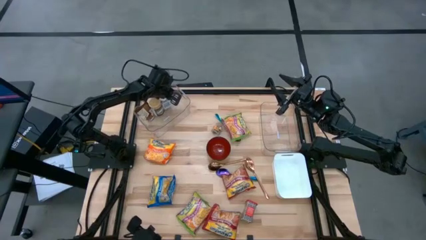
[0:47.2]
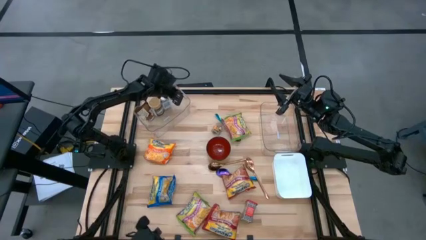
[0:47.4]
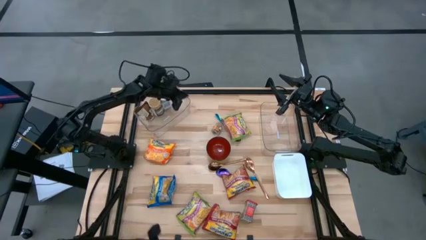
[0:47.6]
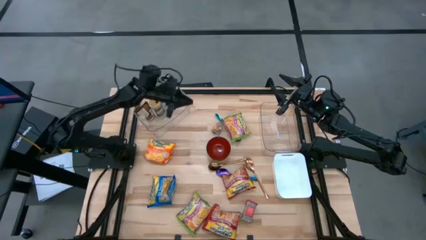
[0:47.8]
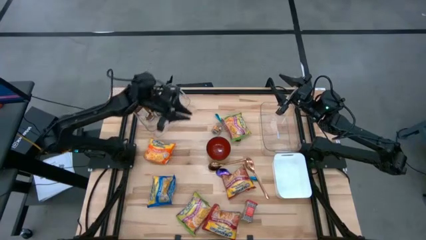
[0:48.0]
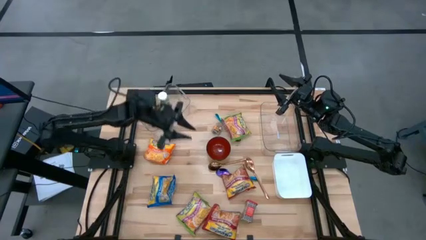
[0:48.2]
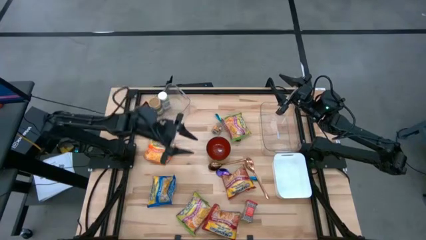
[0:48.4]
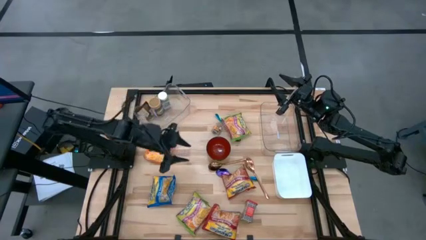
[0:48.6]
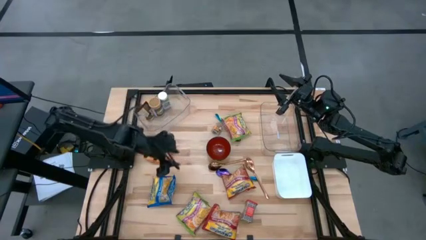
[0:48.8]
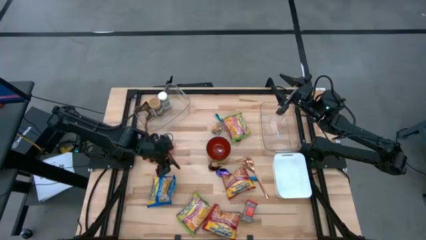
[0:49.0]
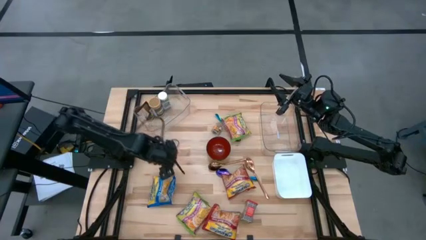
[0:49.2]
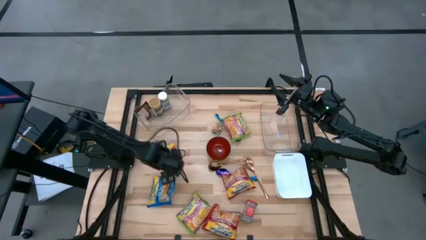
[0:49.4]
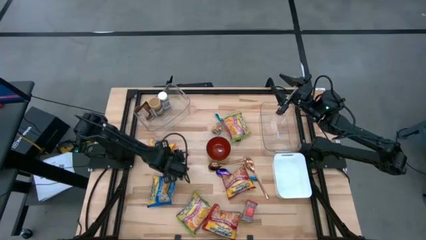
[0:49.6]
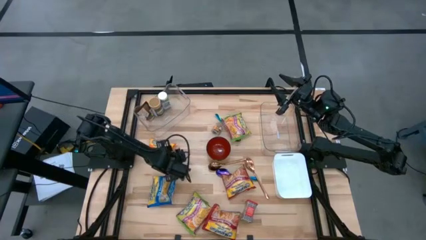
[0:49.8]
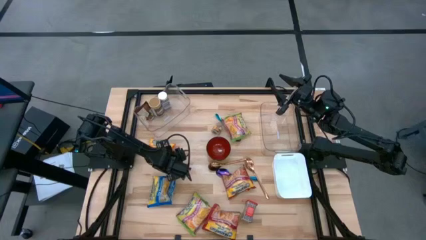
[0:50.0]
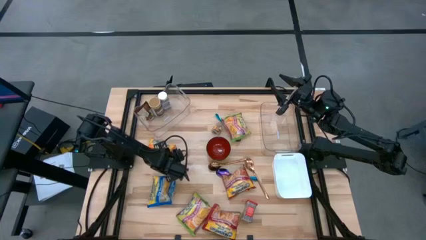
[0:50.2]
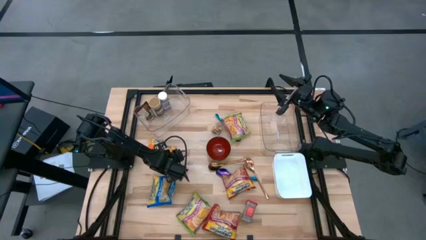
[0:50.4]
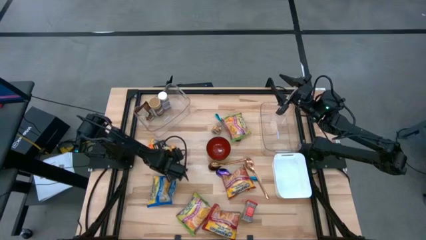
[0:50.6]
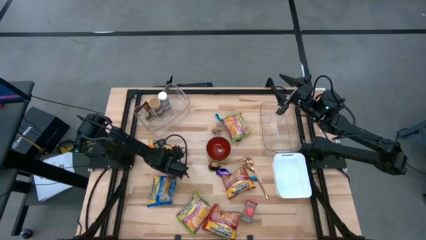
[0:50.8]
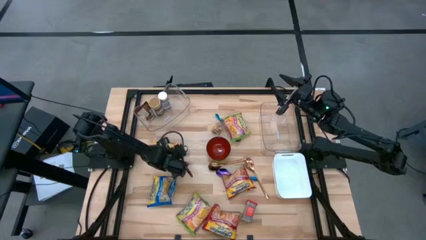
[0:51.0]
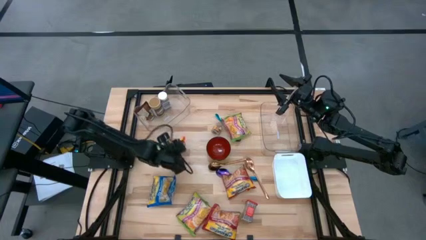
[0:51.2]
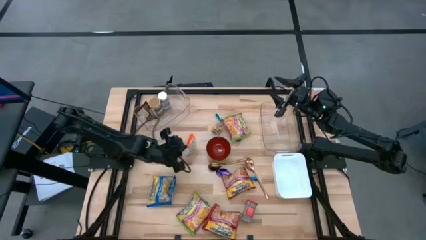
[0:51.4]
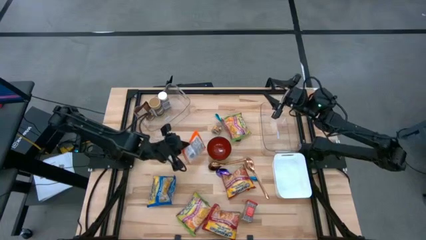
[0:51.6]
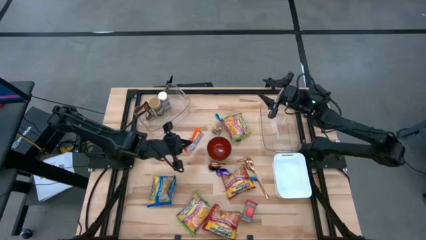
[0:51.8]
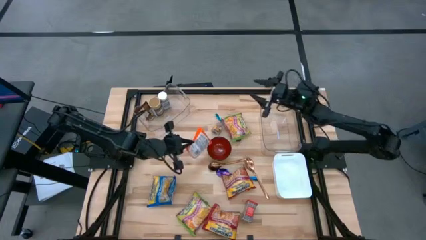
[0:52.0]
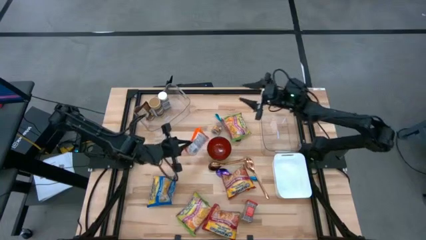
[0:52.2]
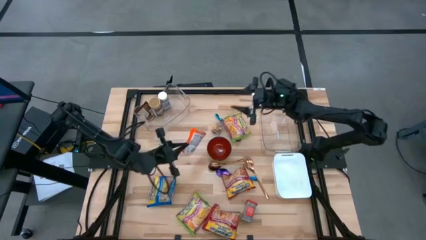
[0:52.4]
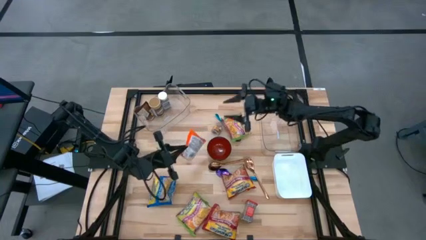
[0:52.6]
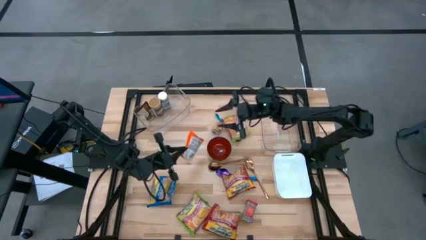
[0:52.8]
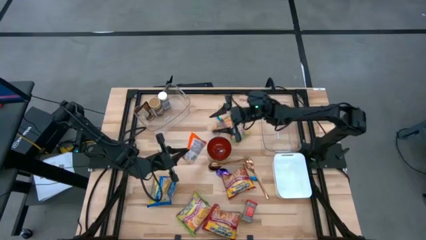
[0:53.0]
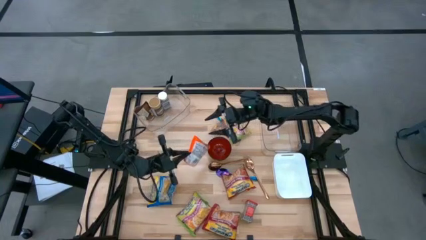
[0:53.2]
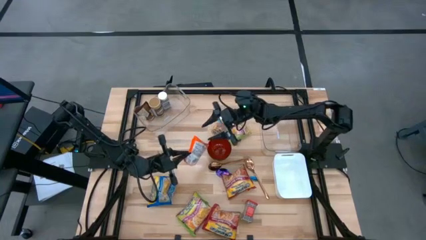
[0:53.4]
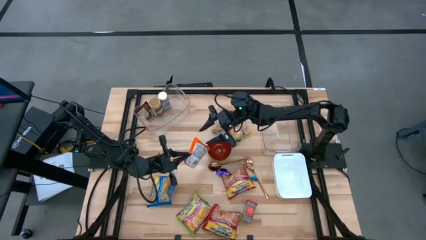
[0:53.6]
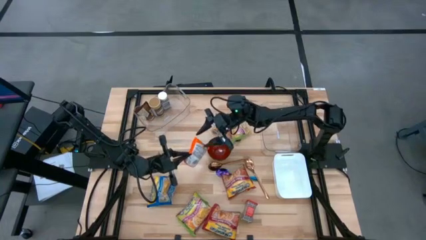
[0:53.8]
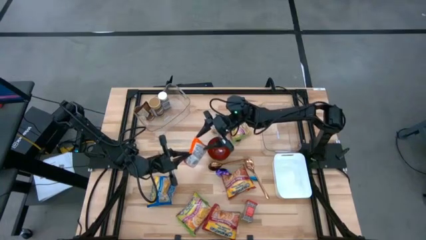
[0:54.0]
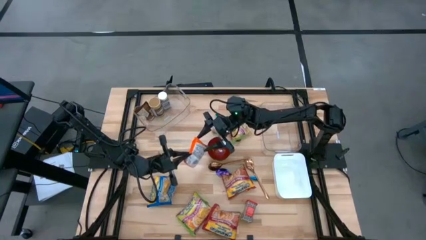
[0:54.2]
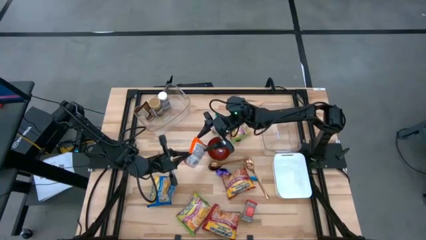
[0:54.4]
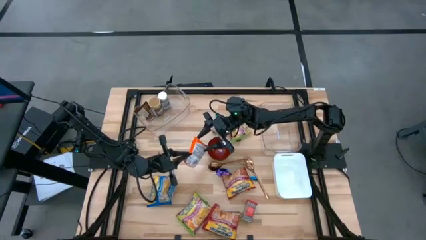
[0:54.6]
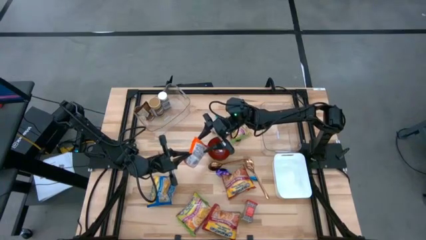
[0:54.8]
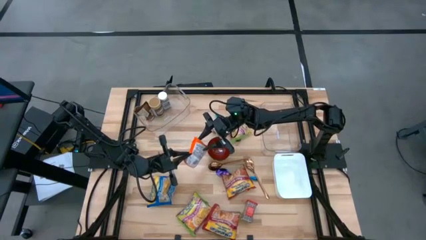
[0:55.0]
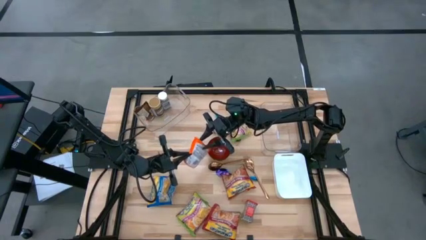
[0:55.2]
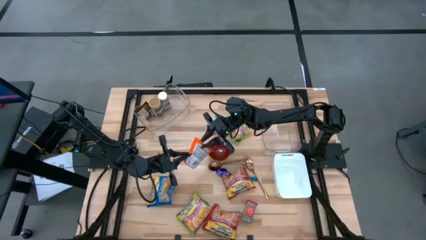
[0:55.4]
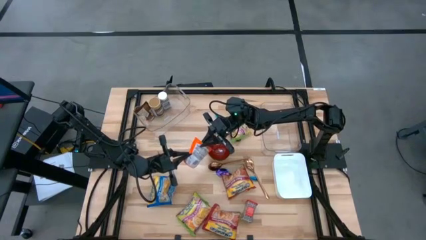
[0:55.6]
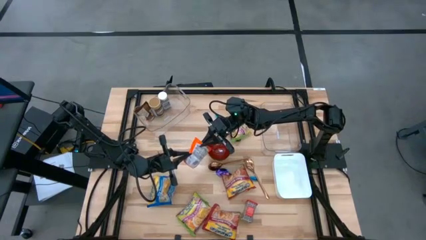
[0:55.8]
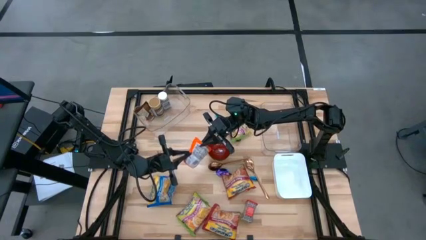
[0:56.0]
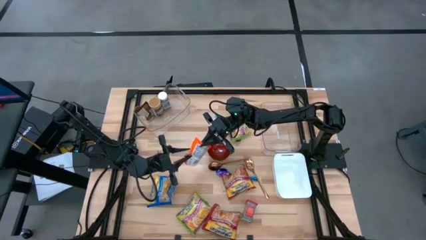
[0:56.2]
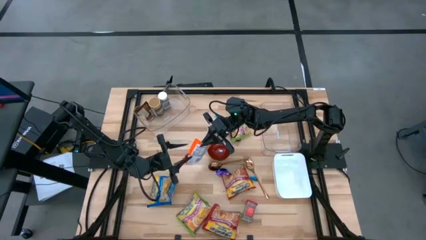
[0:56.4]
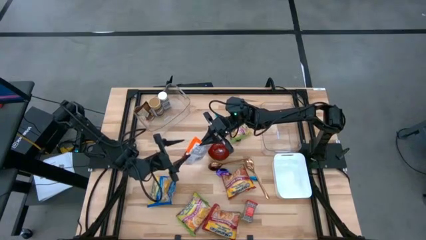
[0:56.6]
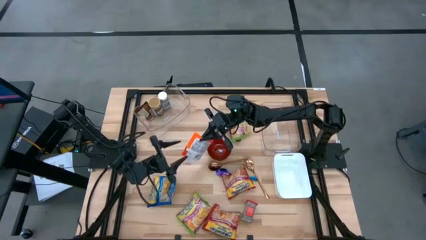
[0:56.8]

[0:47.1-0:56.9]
Task: Pick & Place Food Item
Put the orange noodle pack into the right transparent bin

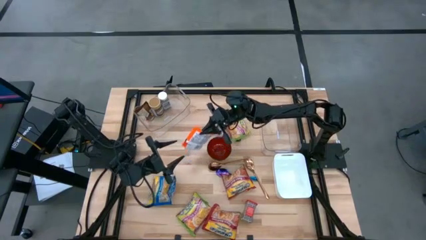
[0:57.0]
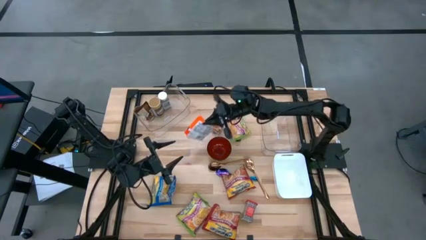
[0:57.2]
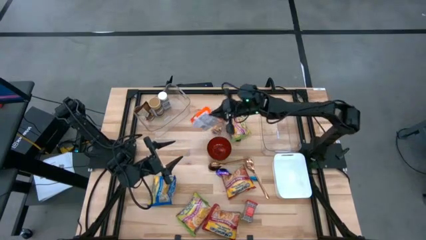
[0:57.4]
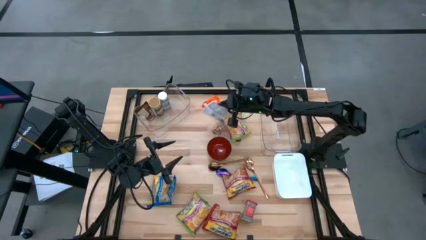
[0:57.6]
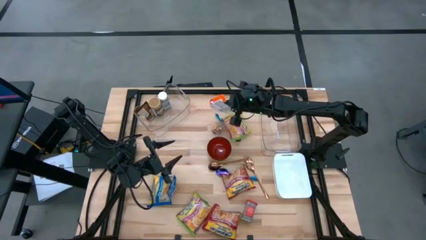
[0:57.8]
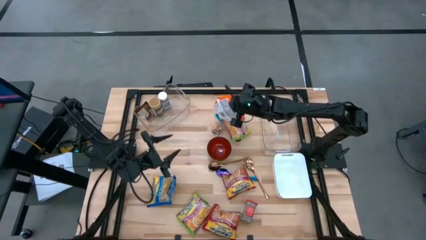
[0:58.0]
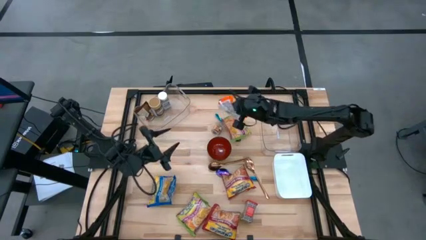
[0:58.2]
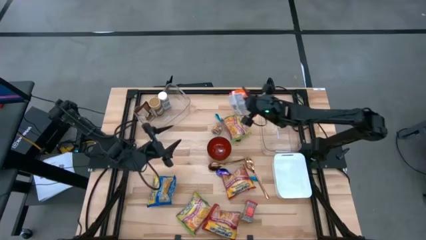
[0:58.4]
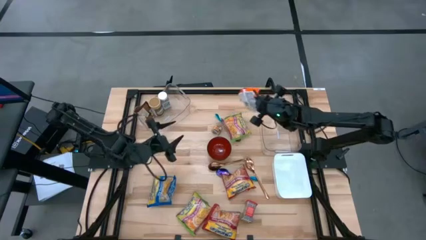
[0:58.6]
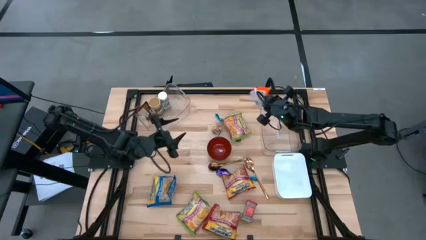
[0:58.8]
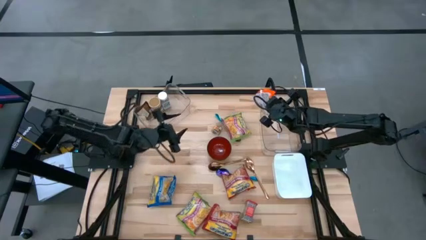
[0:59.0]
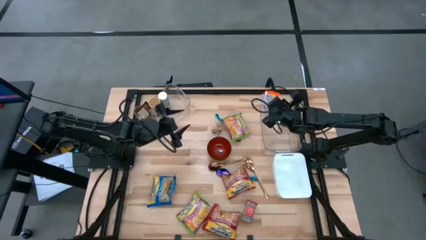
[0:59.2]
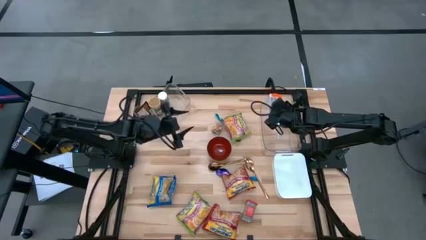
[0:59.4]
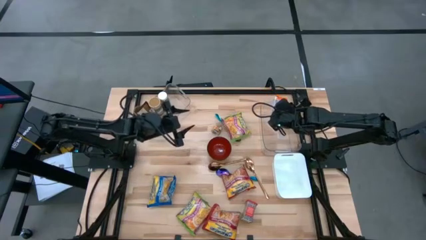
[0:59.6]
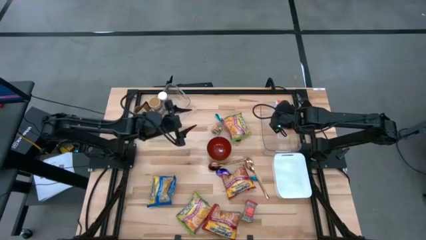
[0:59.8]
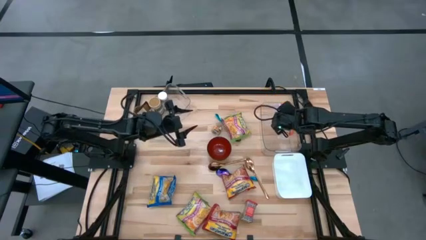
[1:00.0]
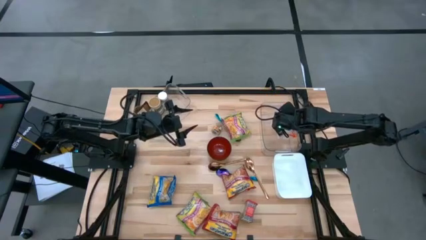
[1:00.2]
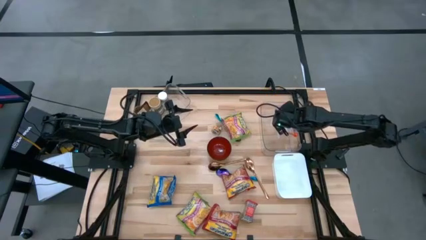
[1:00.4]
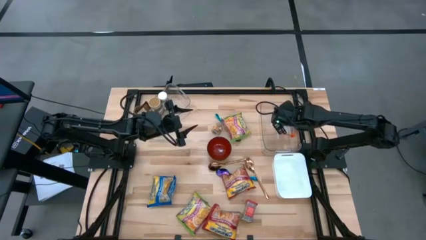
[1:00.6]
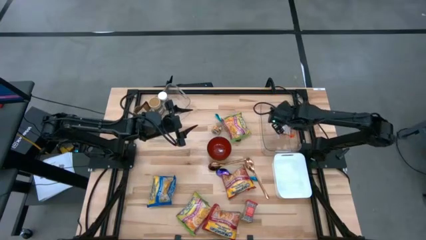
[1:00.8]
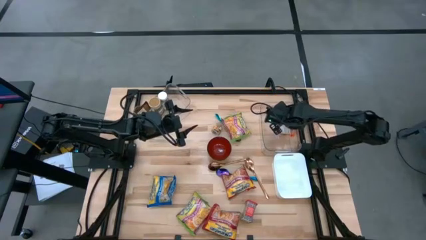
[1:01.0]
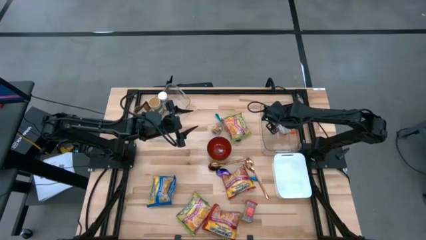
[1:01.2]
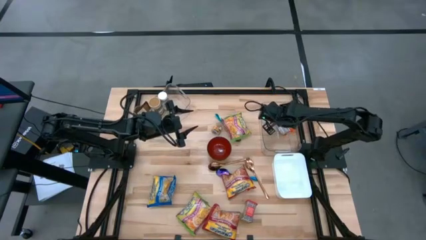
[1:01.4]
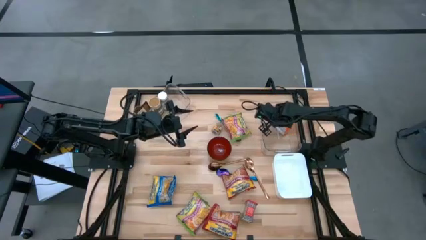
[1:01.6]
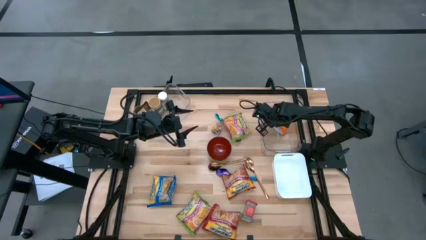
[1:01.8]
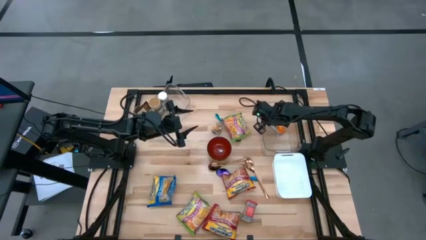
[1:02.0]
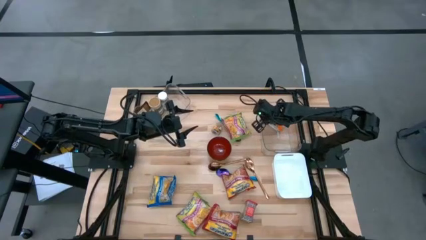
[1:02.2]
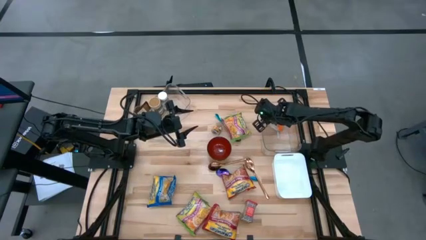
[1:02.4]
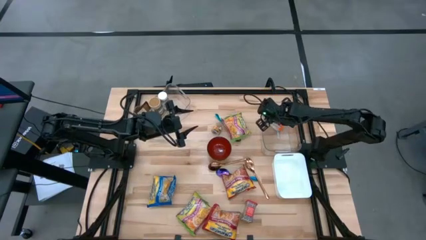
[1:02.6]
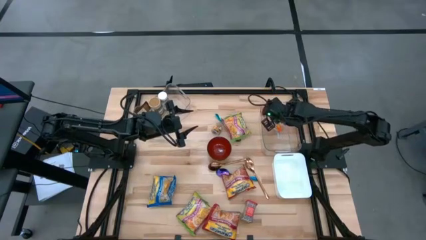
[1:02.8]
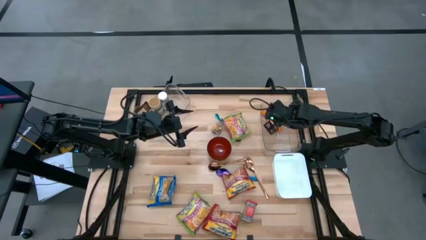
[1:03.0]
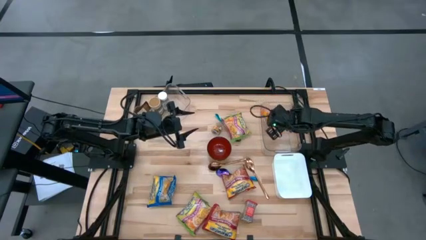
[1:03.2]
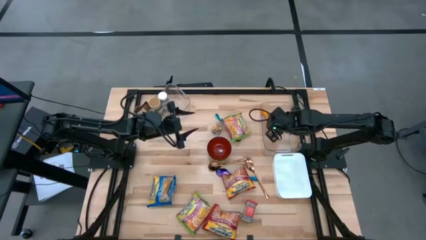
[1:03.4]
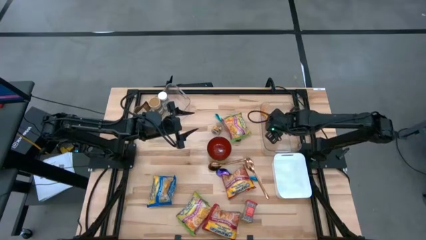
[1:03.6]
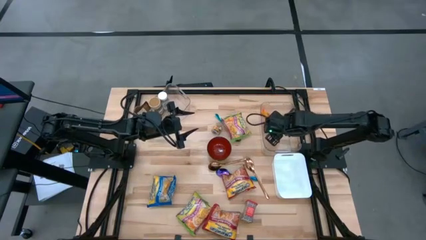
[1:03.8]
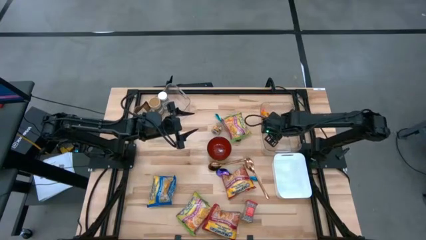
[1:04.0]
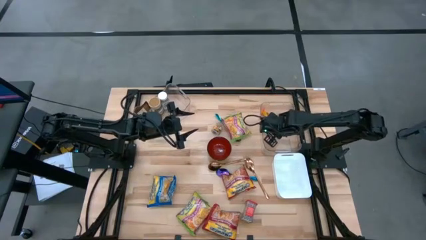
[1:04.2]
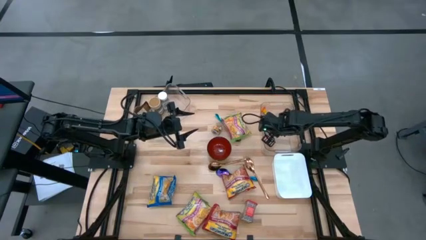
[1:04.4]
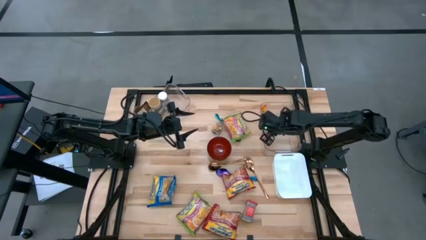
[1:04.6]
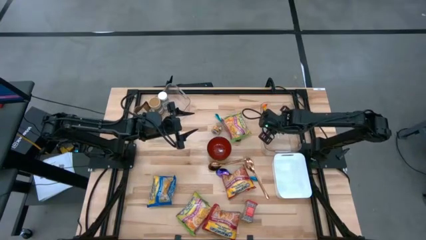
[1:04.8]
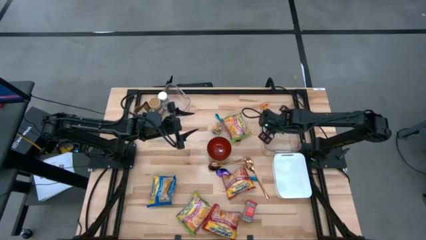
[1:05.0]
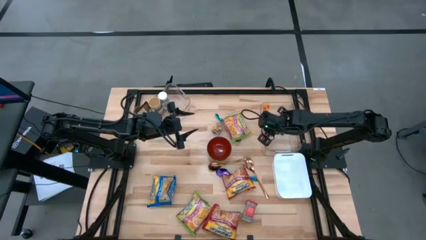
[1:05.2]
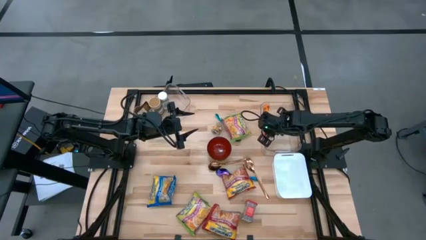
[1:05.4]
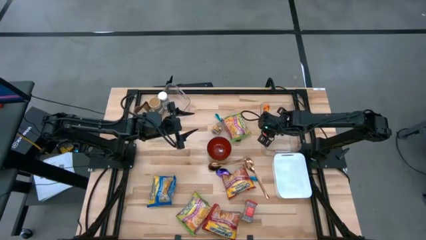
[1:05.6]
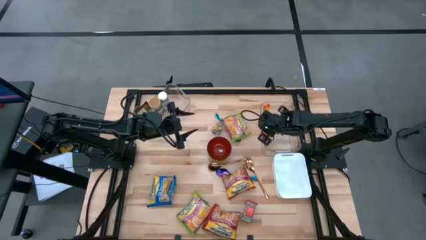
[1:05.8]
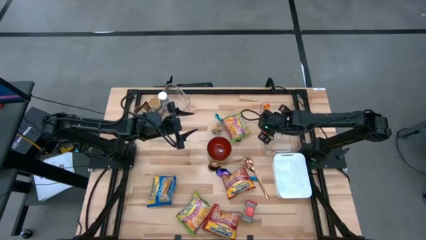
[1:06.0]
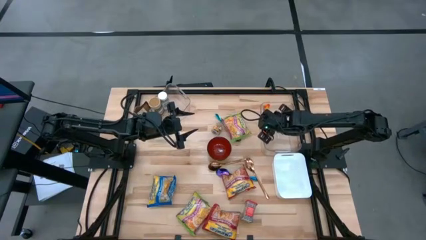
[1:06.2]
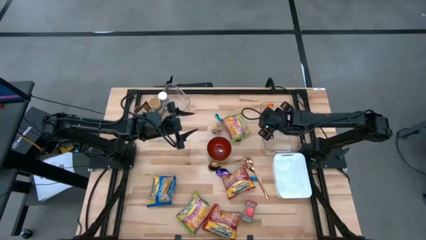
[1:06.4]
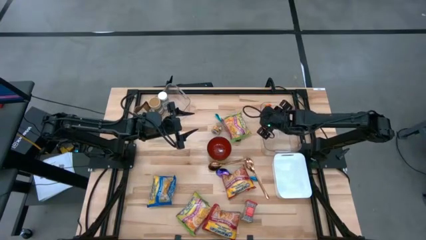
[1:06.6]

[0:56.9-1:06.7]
Put the orange noodle pack into the right transparent bin
